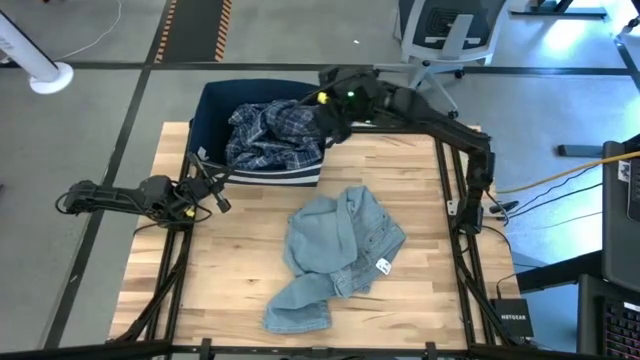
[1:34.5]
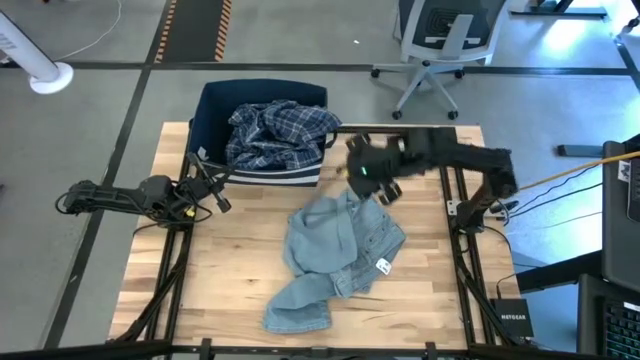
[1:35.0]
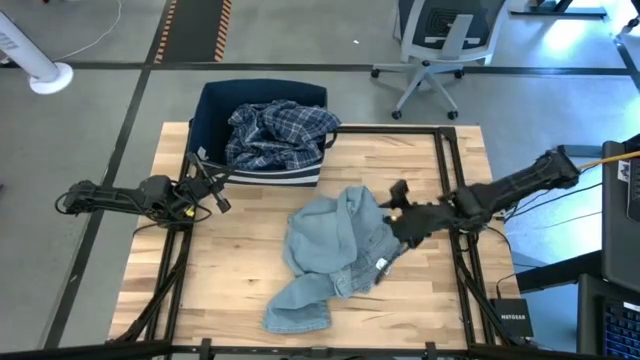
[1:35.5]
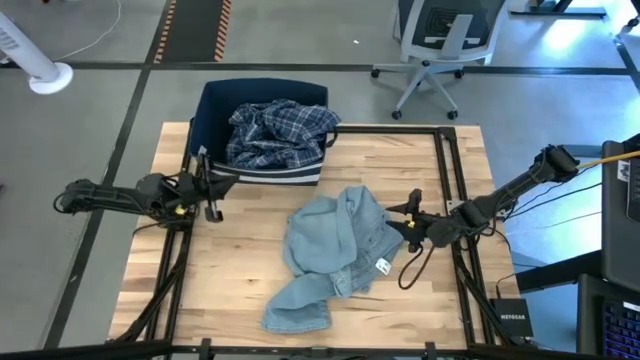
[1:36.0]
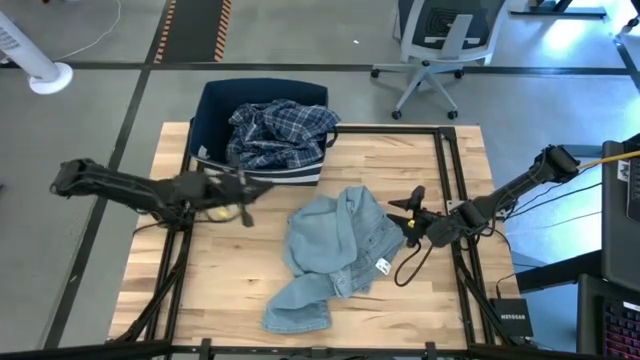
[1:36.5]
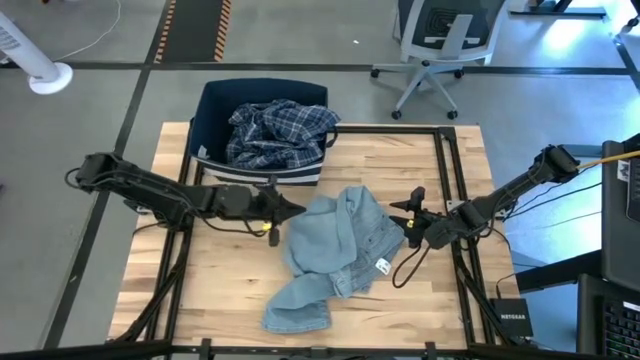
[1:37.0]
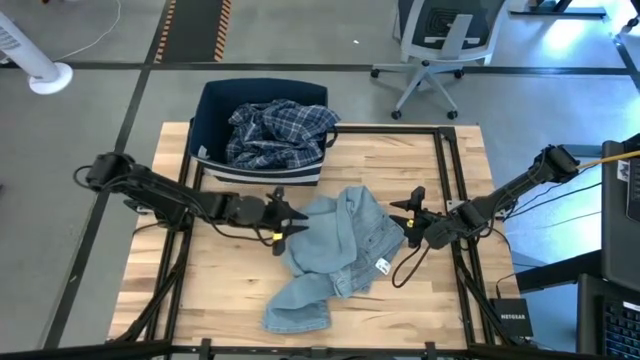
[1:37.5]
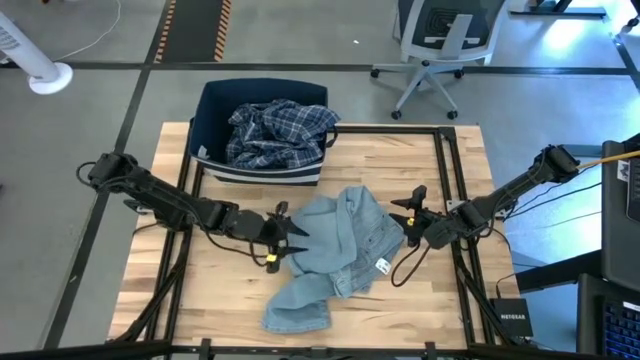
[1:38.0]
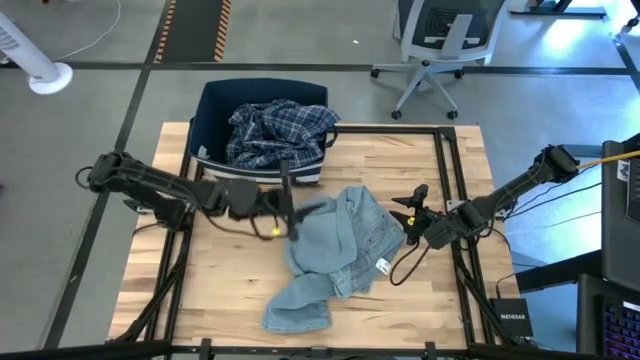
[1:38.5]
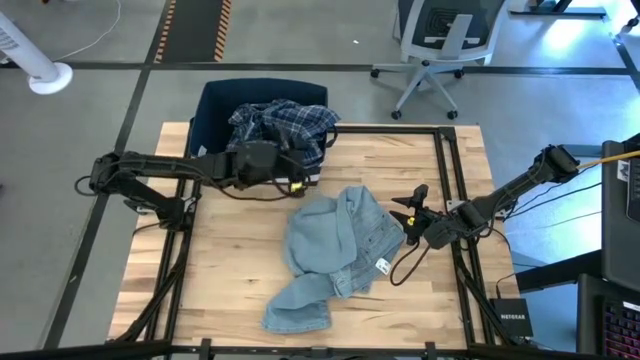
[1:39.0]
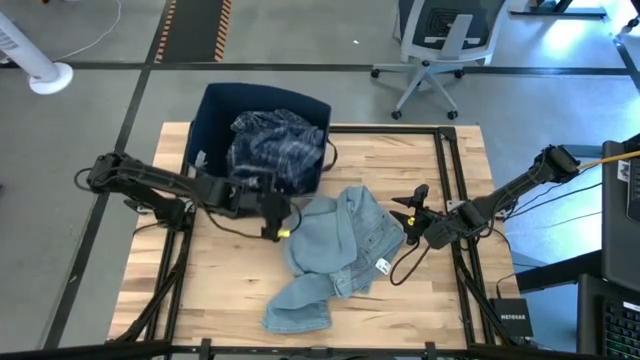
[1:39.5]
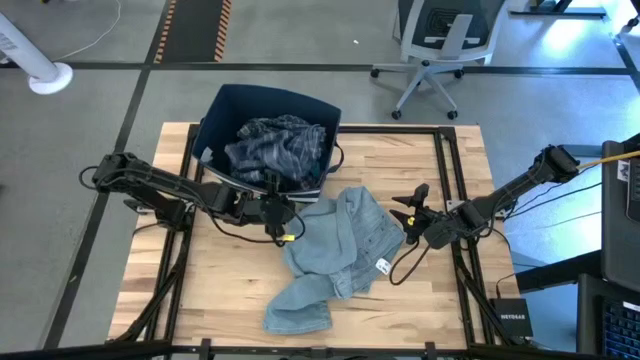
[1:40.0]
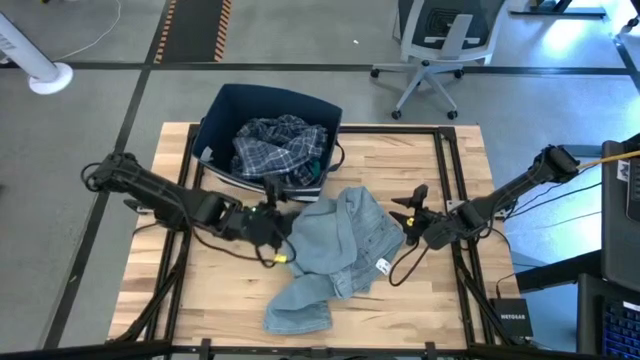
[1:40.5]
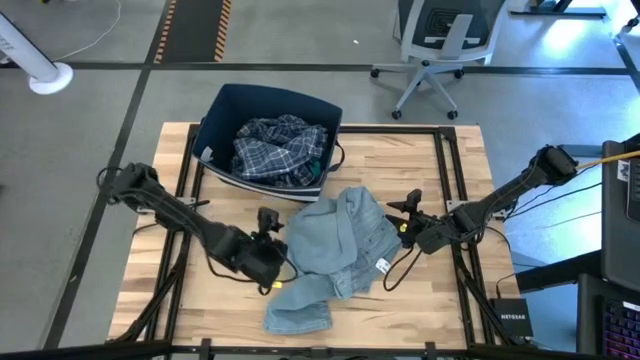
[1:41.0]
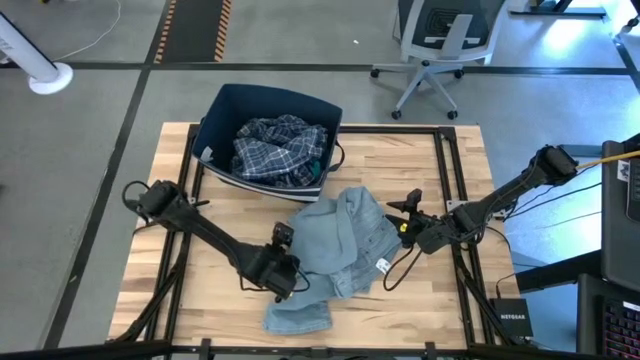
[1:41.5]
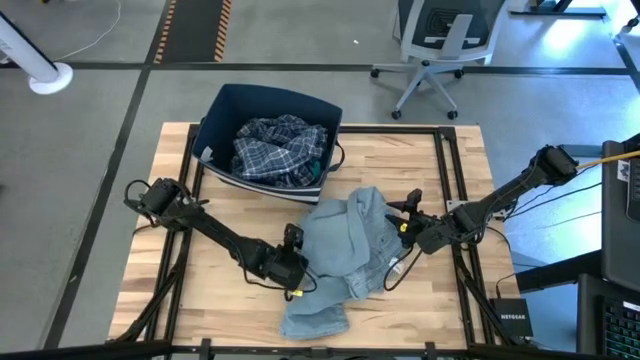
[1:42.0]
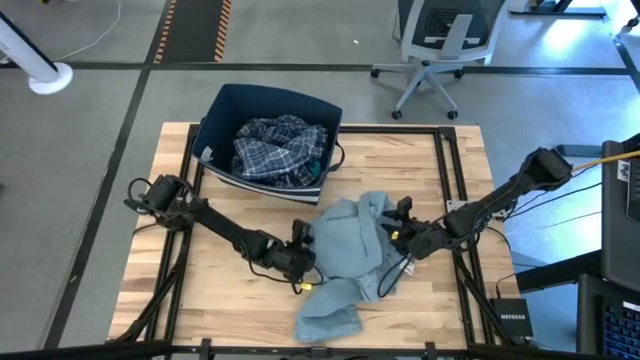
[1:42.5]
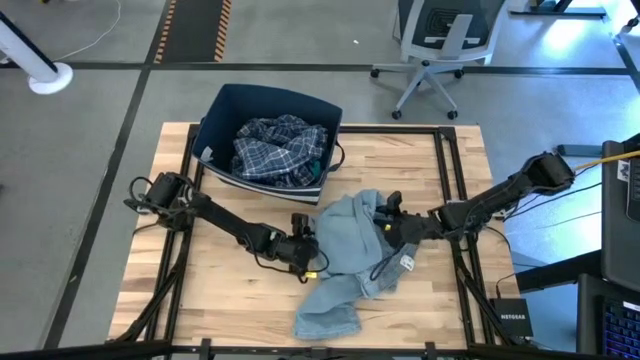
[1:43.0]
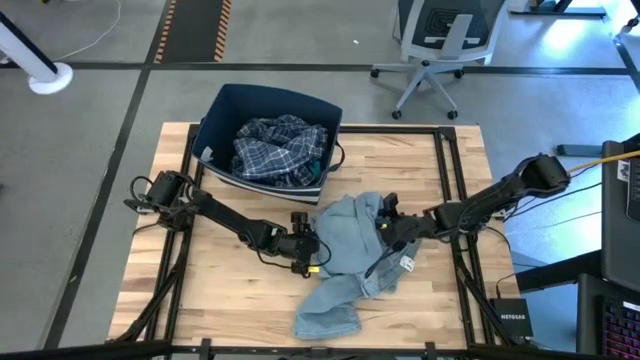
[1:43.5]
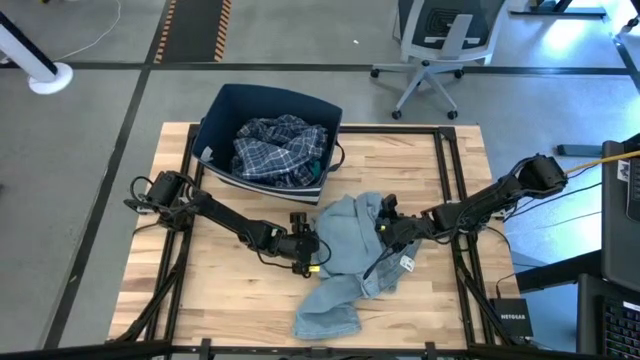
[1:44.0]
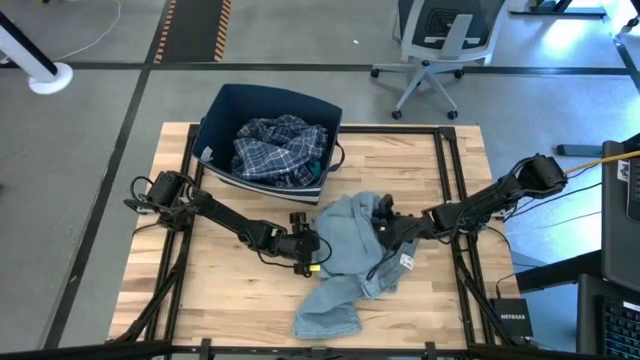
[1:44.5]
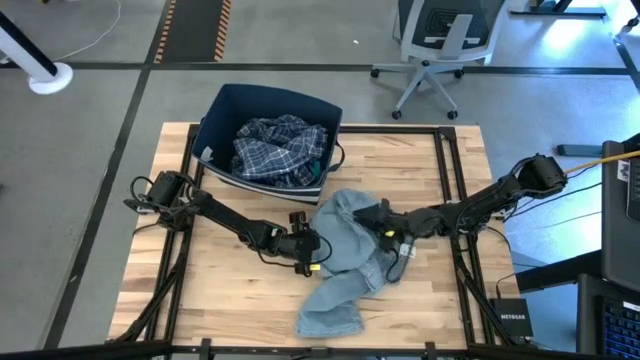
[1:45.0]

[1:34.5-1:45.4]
Task: Sort clothes
Put the blue pants into the laundry bin
